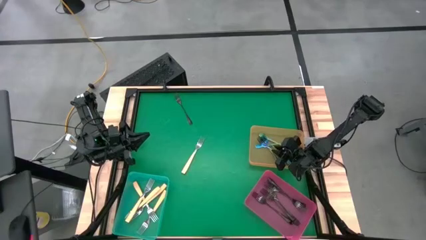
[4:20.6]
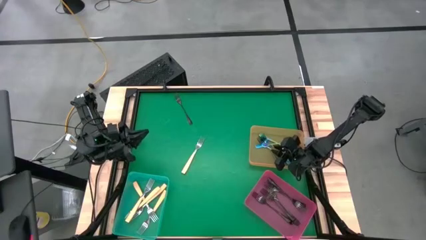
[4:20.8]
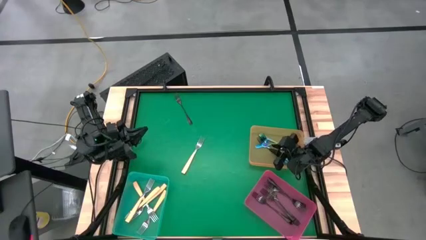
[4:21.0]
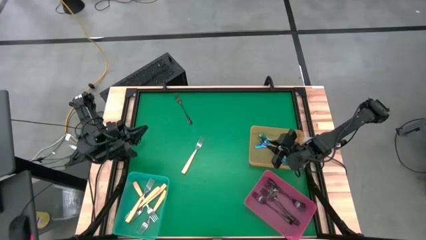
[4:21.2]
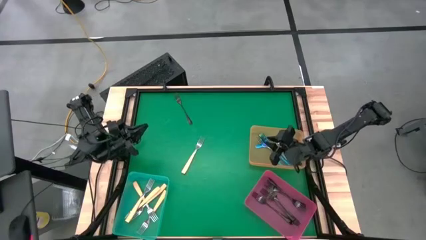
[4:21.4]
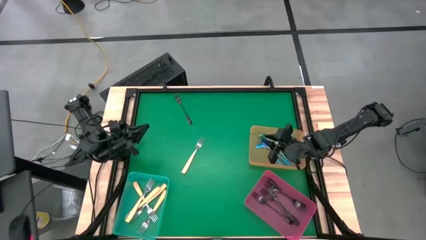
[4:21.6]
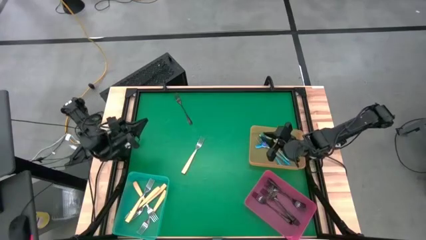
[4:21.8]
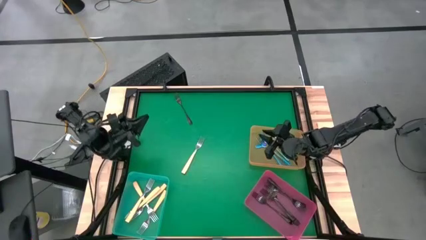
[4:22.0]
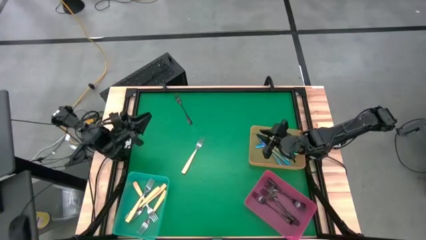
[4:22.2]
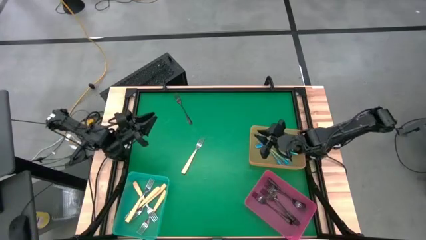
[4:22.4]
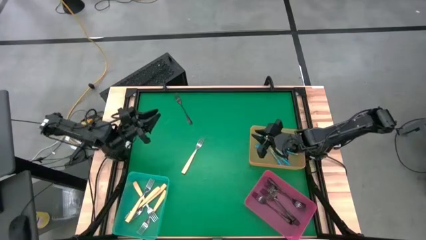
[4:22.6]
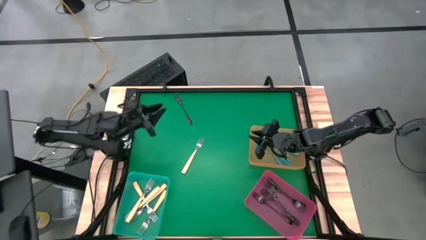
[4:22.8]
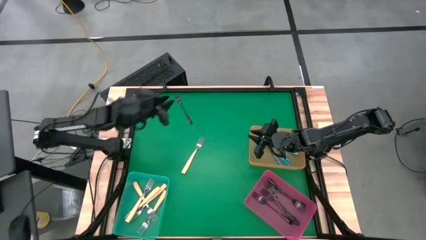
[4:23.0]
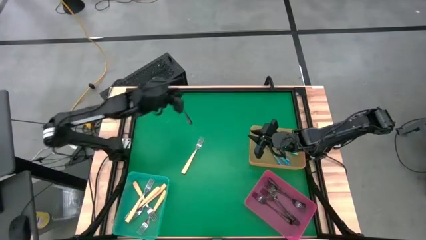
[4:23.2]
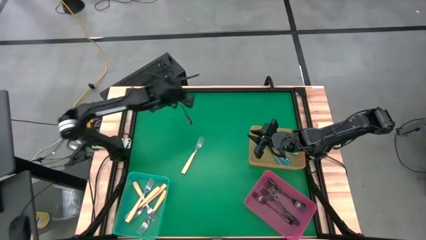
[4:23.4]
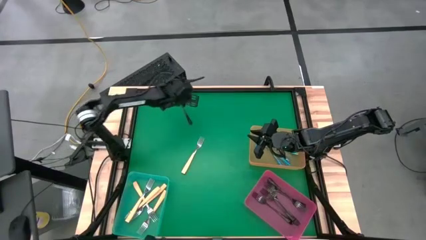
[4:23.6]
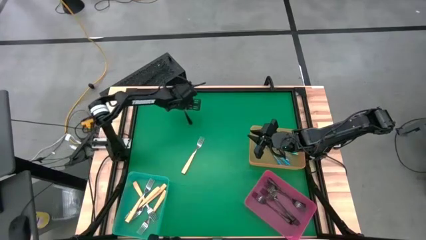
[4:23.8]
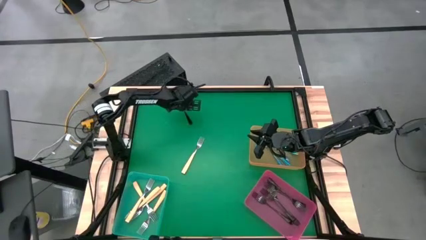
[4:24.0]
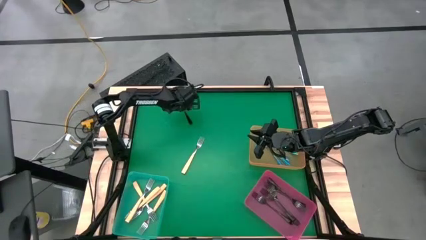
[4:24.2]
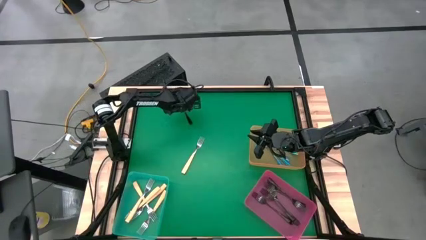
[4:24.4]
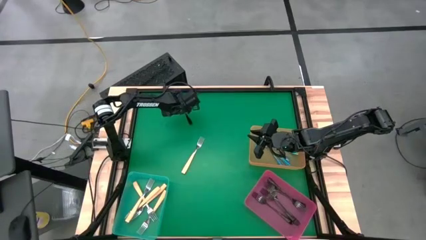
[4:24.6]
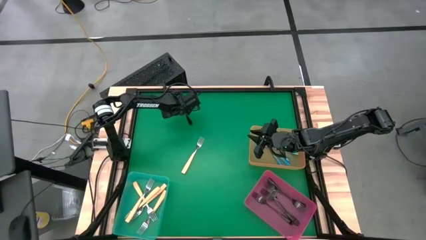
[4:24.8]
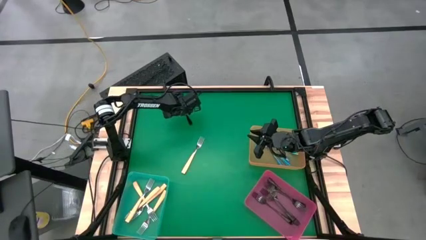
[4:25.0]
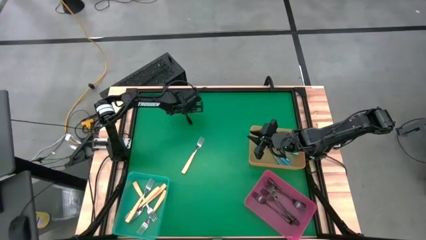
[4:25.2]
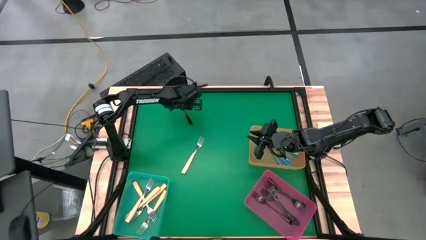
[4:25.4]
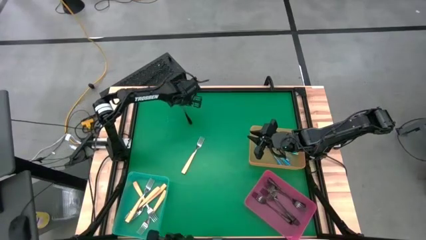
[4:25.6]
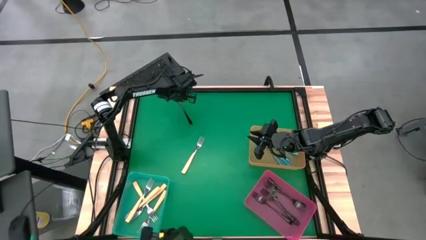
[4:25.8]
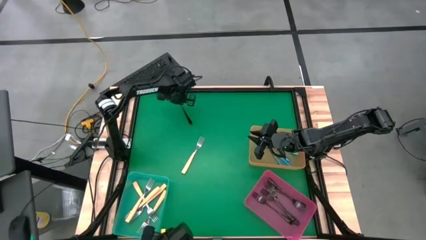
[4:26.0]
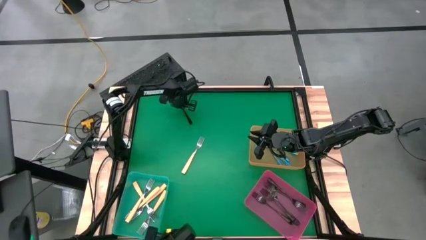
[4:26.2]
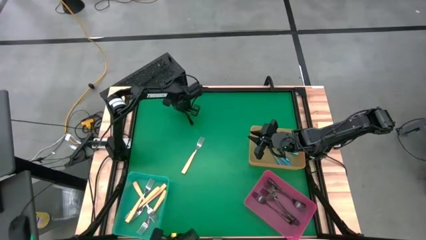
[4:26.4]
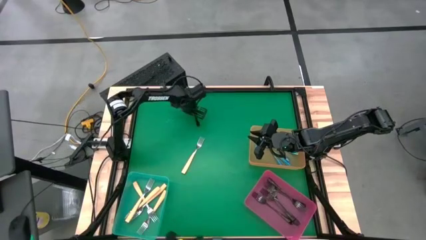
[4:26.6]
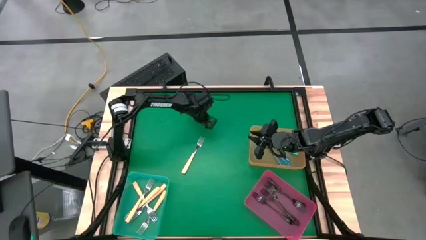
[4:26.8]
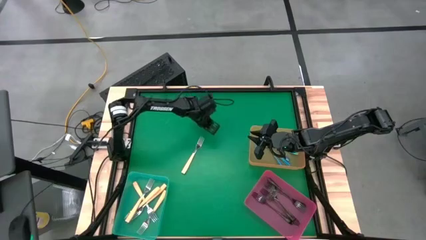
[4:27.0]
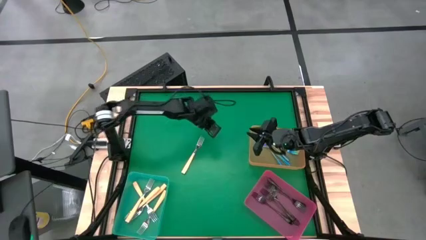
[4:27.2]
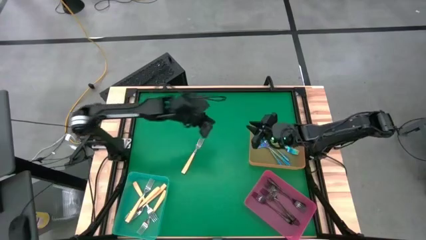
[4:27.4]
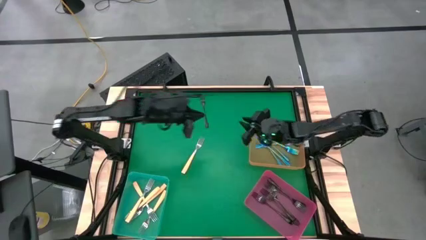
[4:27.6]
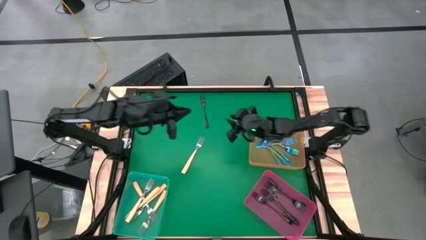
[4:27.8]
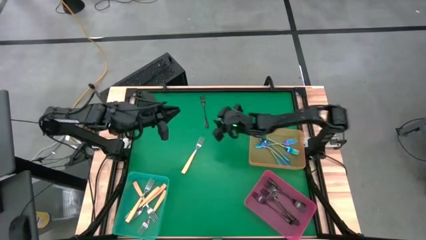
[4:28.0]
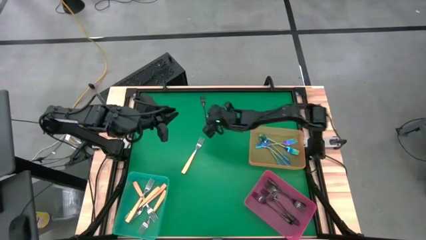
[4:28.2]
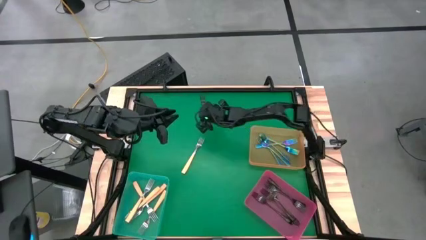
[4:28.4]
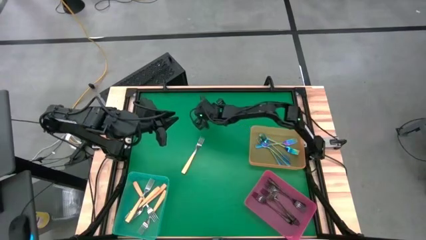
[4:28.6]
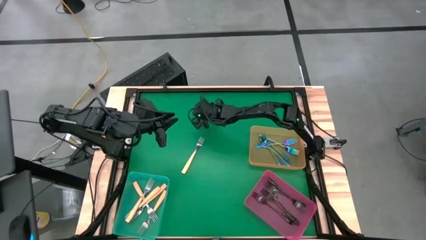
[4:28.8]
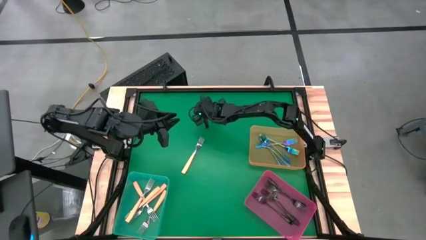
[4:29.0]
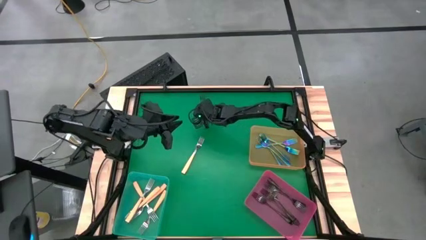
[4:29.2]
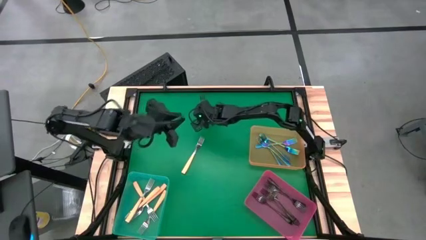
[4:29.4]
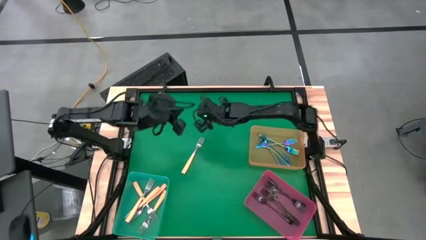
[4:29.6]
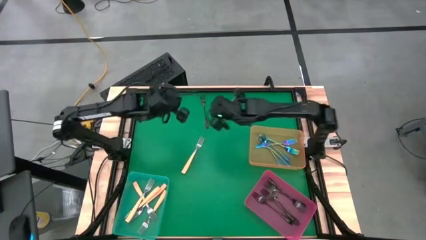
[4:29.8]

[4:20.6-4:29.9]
Task: Sort silverware by color (type)
Put the black fork into the pink bin

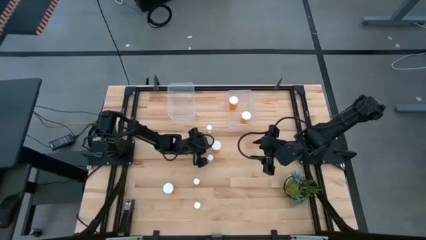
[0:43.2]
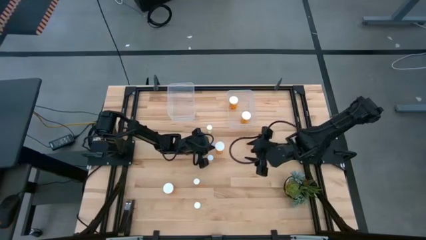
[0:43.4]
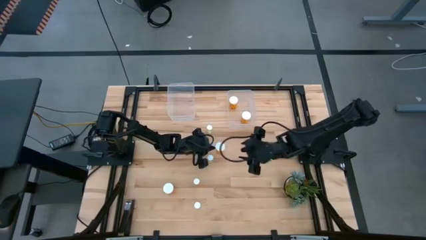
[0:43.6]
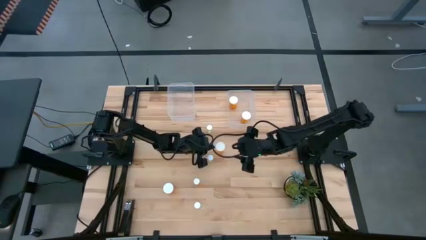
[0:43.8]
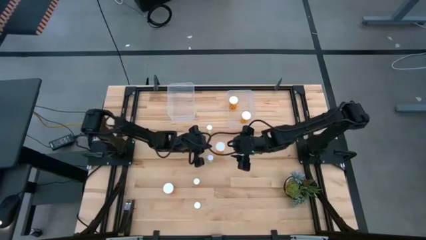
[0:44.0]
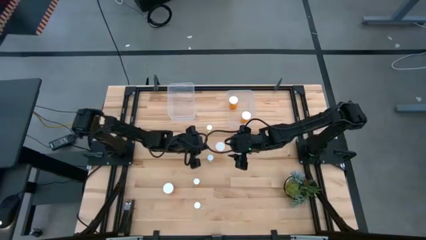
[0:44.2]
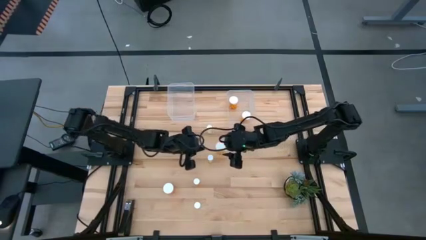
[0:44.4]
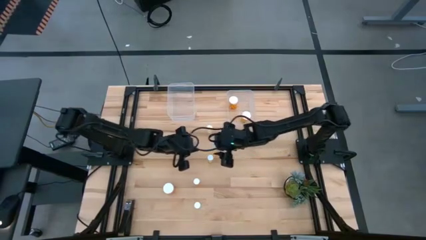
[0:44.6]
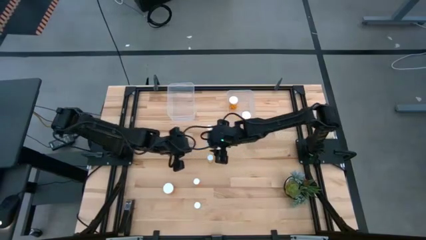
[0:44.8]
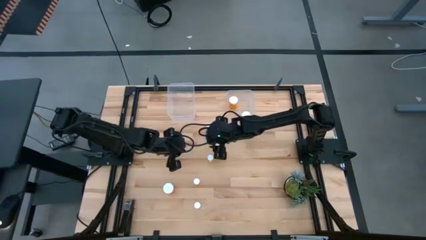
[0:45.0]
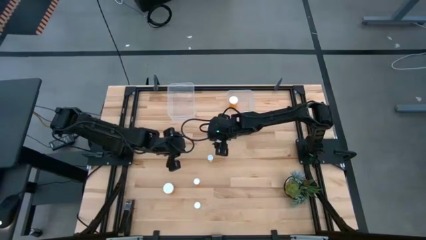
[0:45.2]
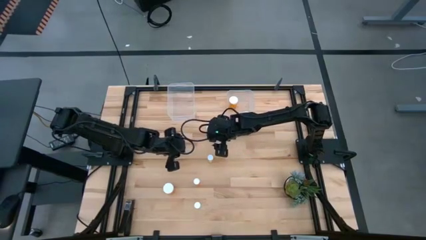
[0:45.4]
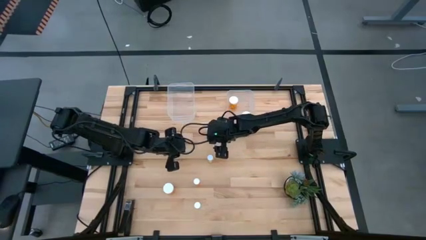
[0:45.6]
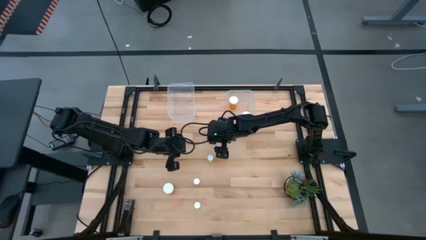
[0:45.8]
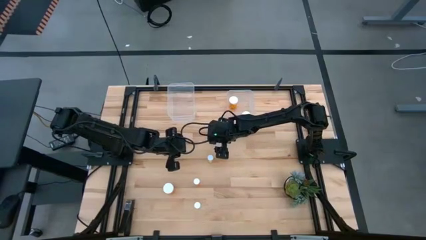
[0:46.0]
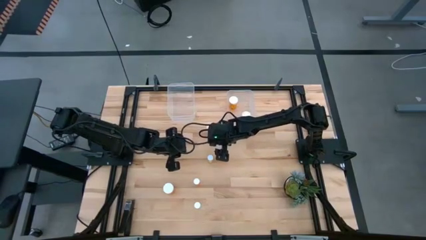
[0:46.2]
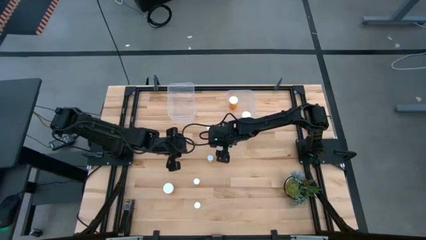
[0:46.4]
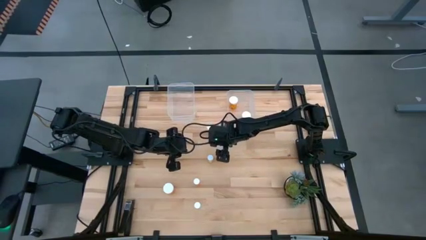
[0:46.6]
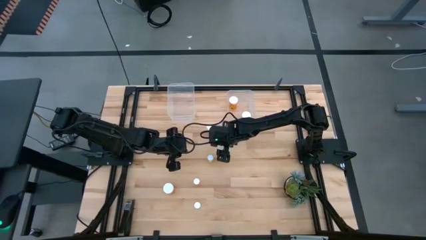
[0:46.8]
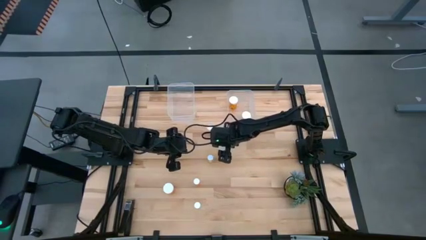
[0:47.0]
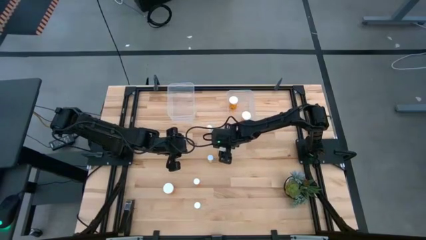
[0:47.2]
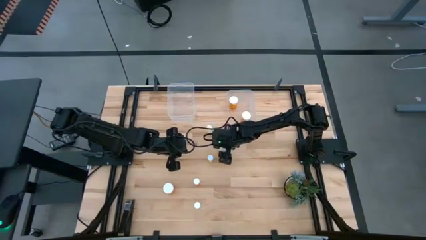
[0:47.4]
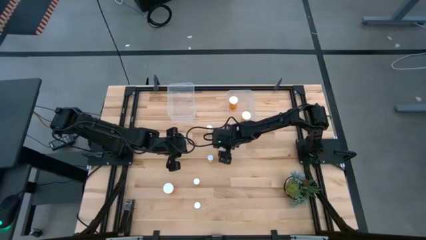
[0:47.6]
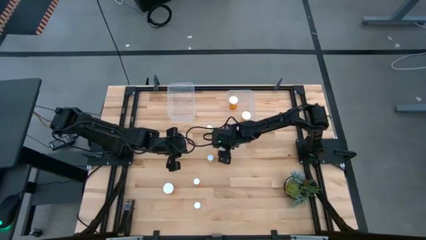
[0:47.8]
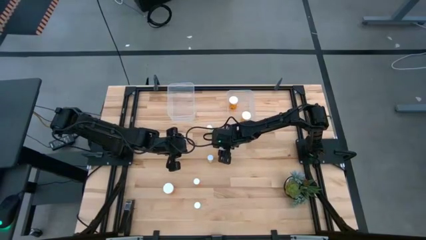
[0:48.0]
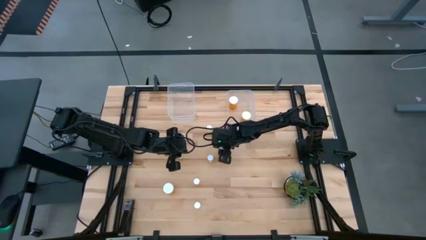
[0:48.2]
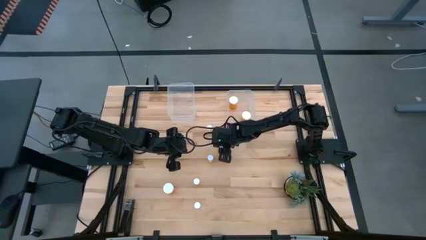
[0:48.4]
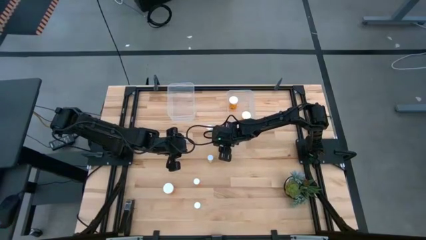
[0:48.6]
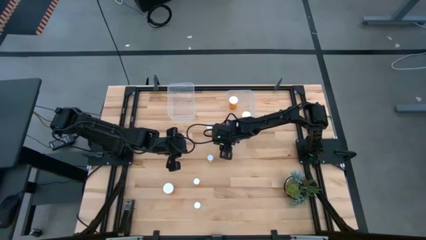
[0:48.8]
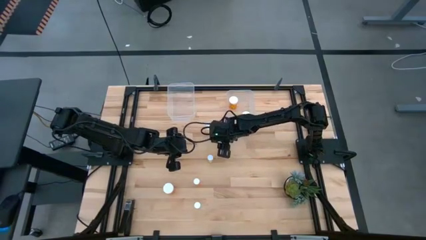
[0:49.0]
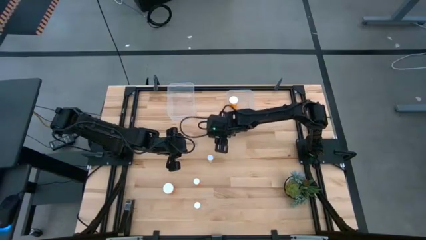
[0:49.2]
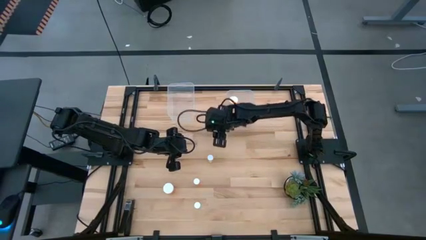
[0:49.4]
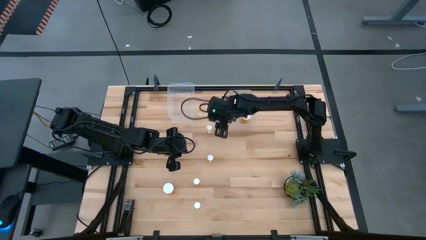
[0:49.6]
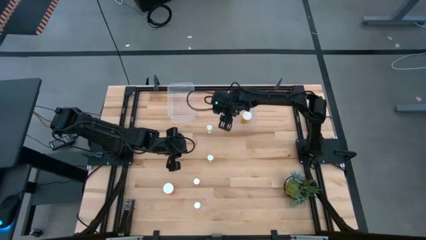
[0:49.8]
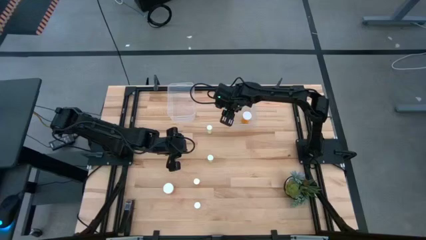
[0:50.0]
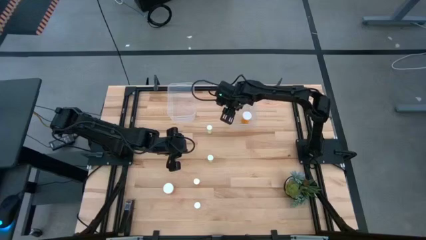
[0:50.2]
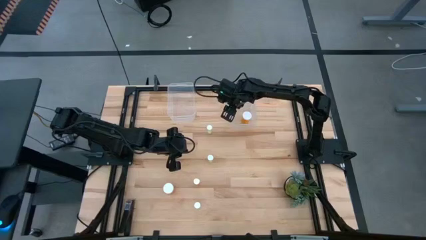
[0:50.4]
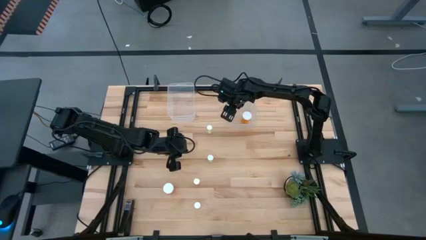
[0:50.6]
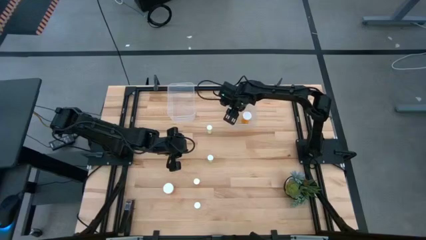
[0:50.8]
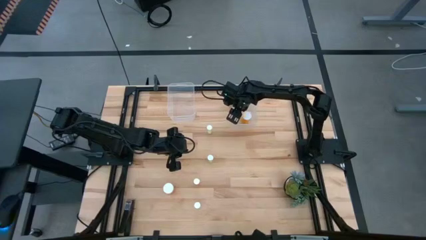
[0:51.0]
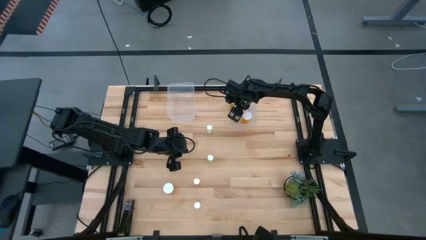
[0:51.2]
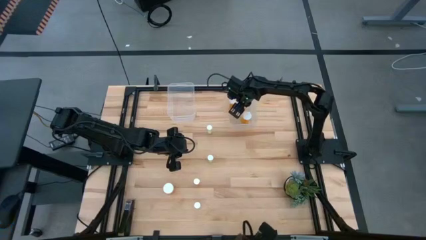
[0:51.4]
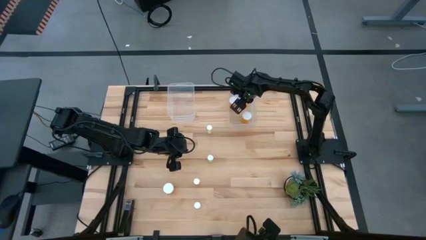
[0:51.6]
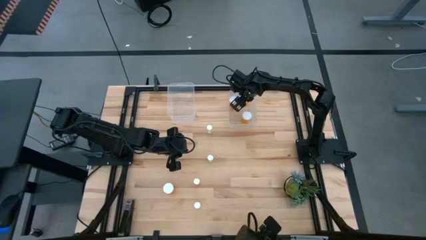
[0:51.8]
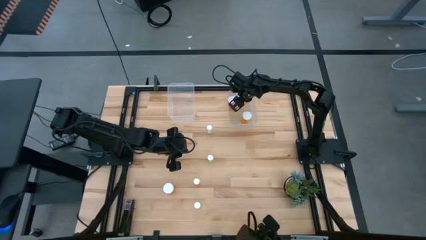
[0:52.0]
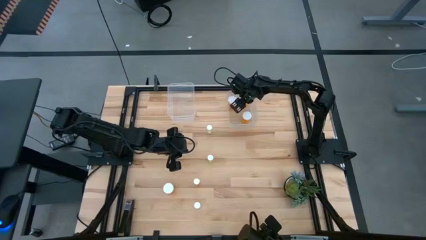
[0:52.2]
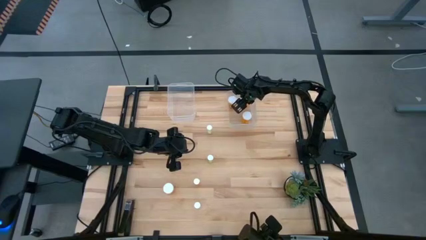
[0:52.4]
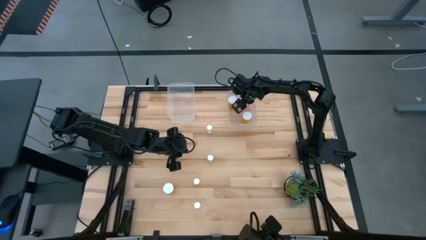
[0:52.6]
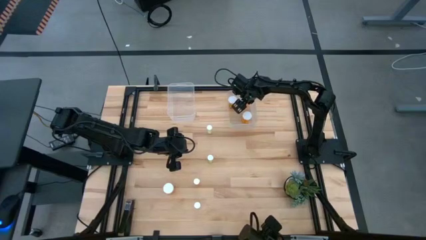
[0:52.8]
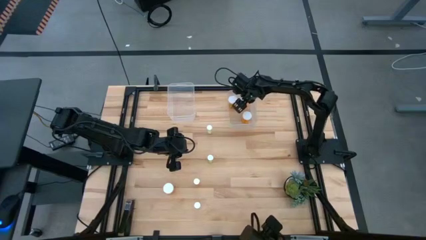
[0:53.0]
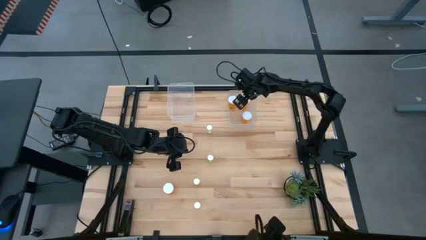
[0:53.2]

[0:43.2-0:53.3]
Task: Pick and place medicine bottles into bin by pill shape (circle, oval)
Put the large orange pill bottle into the right transparent bin
